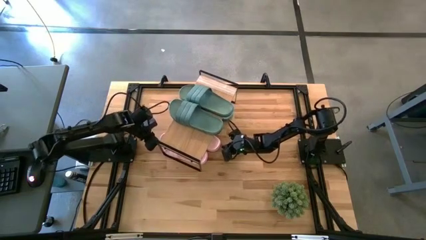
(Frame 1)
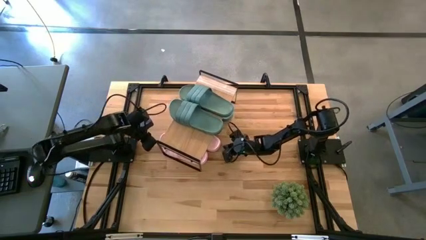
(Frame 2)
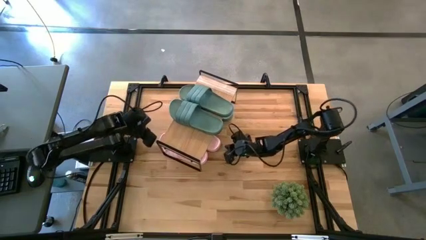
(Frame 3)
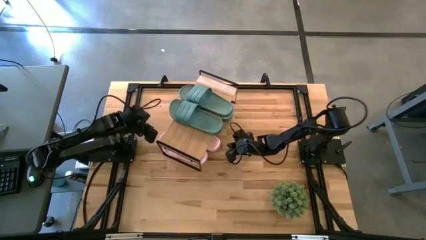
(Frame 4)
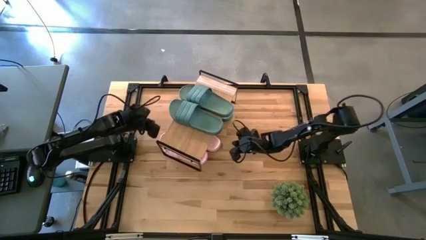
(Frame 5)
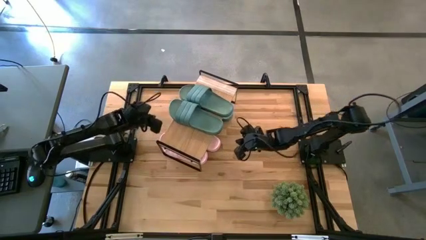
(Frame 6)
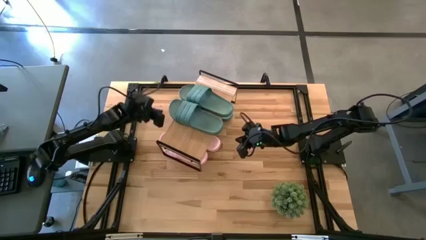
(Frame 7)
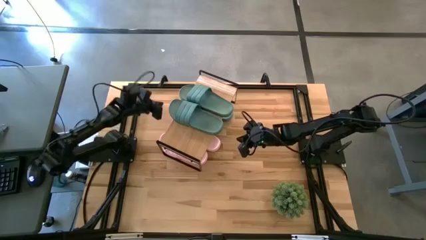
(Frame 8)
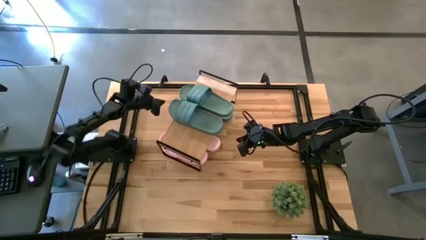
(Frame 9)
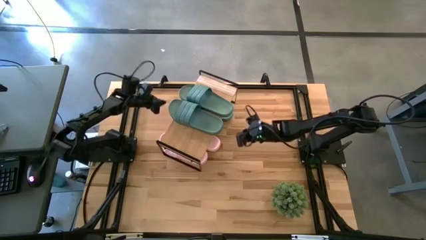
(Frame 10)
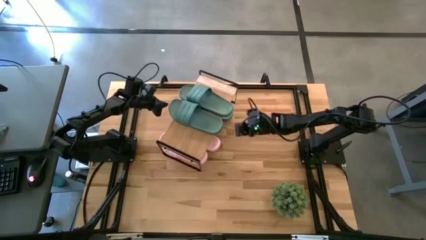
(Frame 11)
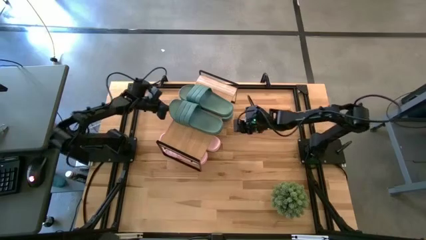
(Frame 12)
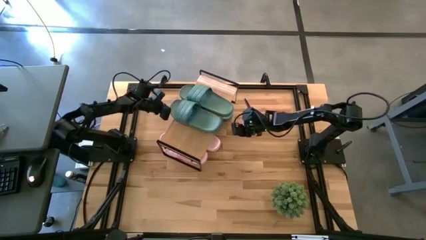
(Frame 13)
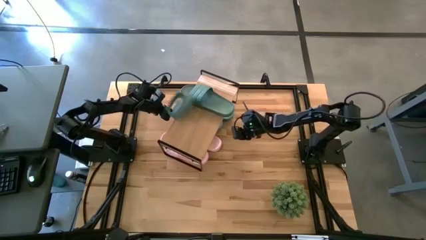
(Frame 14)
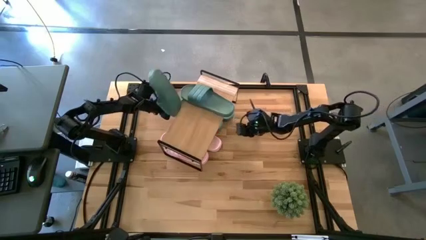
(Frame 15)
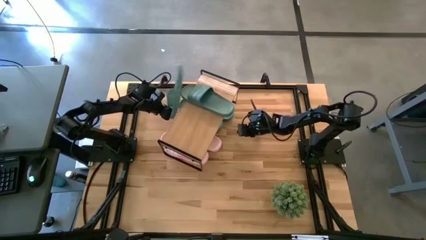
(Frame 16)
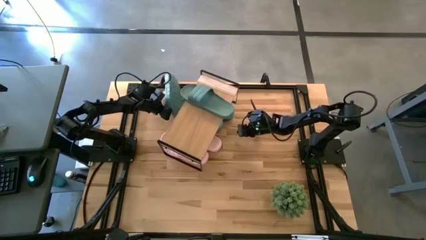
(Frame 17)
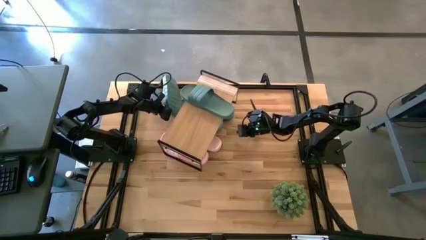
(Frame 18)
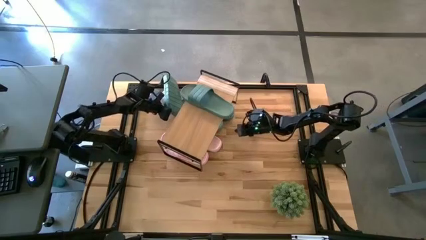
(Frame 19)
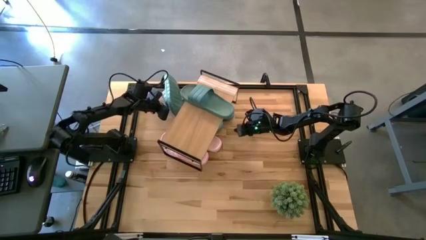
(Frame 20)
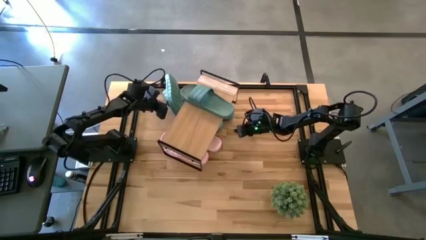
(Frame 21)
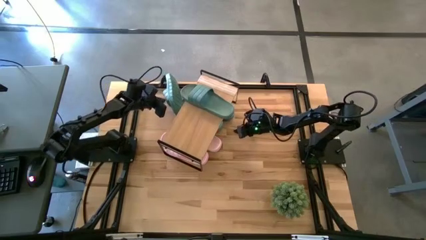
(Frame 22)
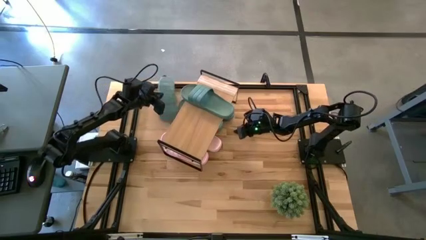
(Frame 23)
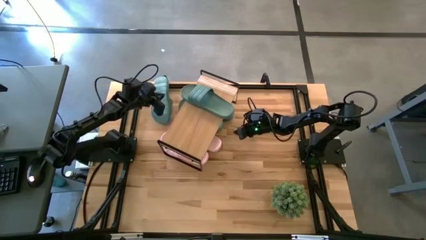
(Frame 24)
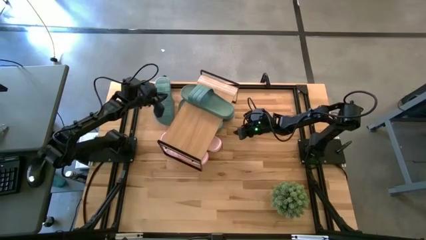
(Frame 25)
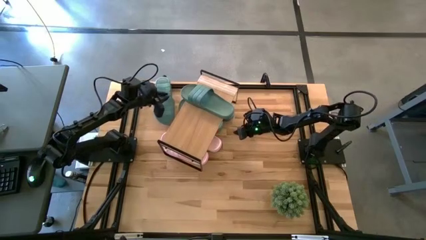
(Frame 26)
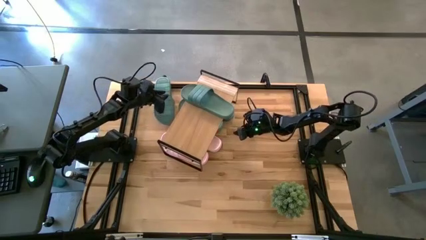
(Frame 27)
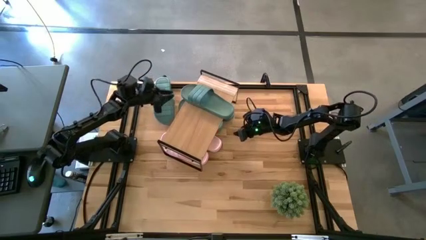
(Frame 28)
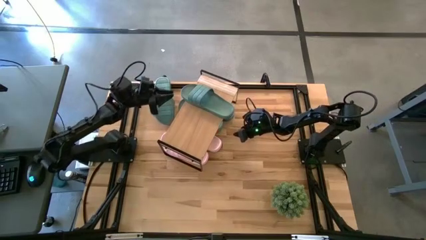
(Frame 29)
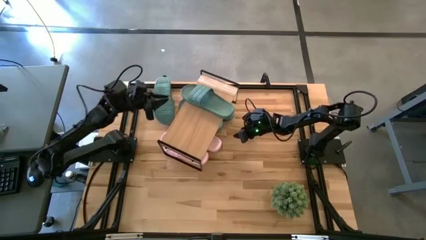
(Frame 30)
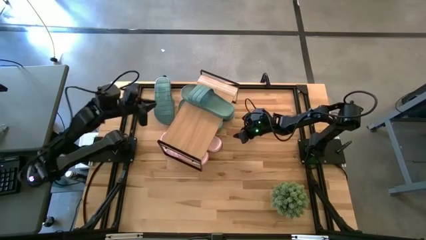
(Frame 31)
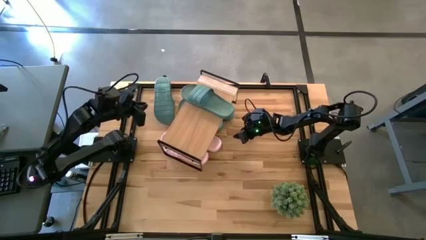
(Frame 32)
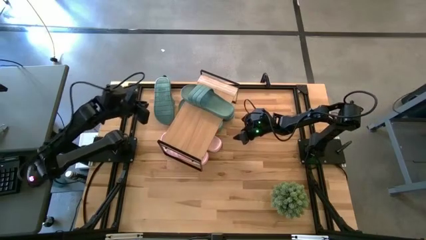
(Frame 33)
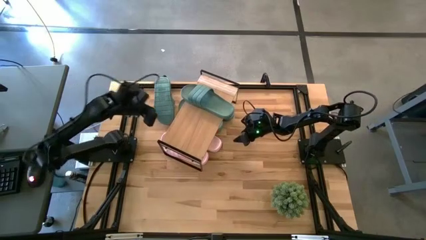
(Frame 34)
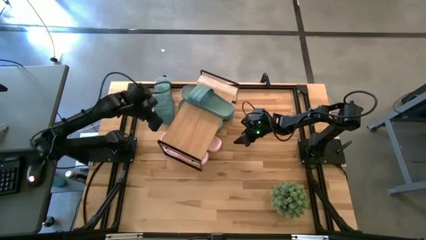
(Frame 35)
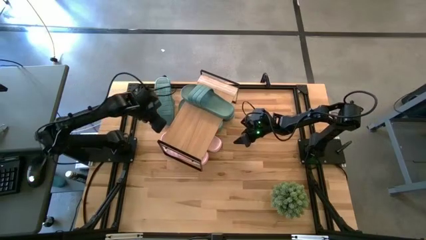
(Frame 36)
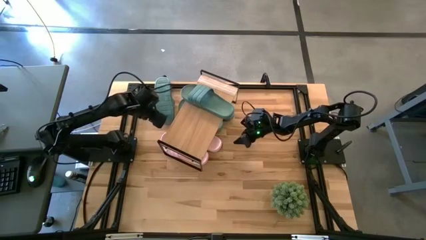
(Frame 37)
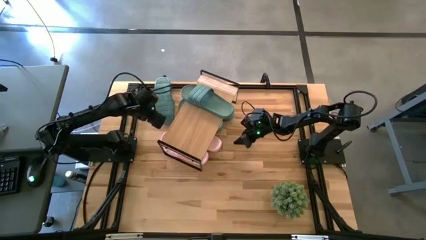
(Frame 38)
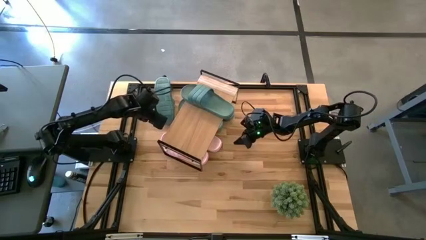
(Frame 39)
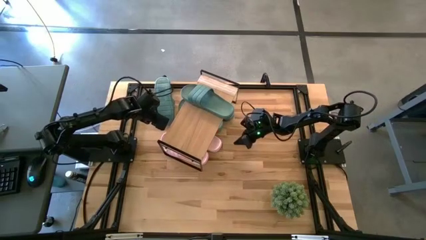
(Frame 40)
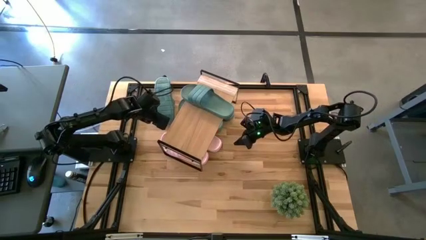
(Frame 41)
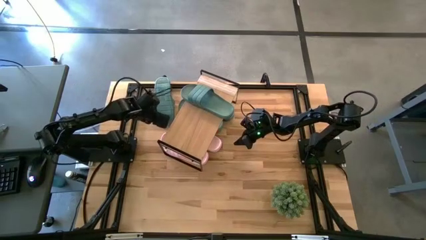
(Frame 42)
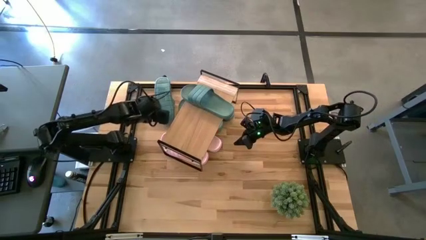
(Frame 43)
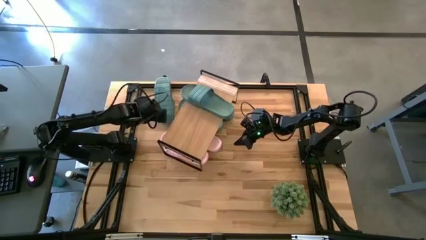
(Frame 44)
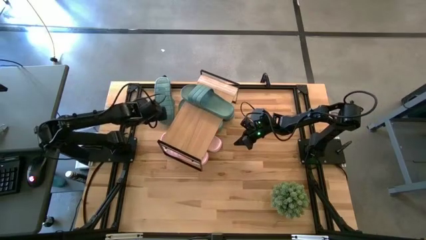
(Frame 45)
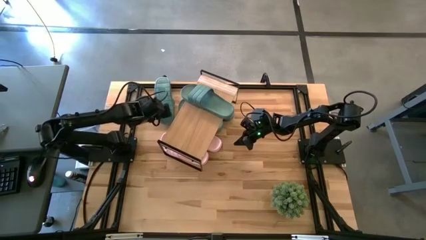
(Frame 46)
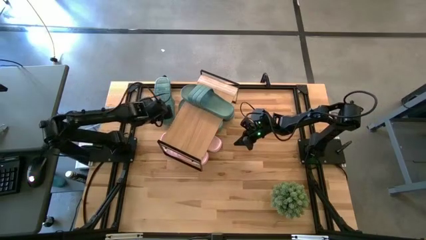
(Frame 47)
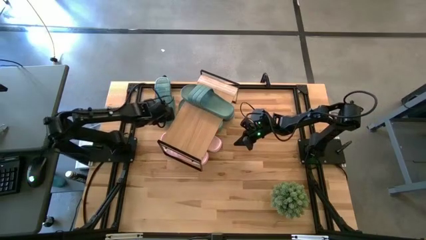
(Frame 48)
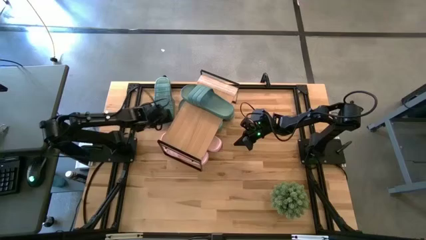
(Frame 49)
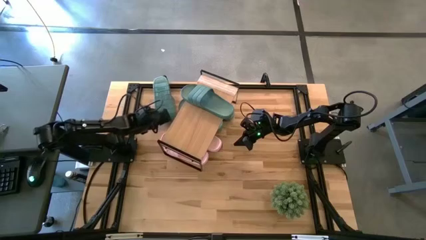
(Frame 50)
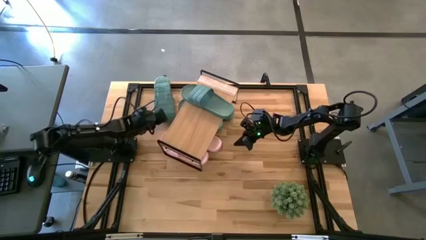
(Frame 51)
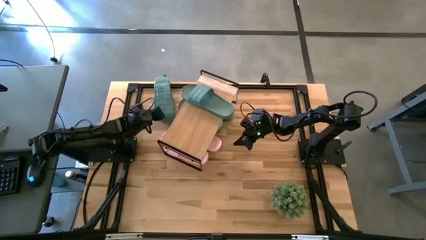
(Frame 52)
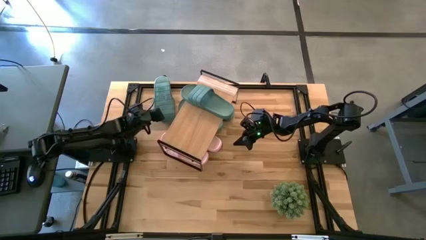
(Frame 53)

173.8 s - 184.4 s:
Task: Pick and place slides into the shelf
Put the green slide on the shelf

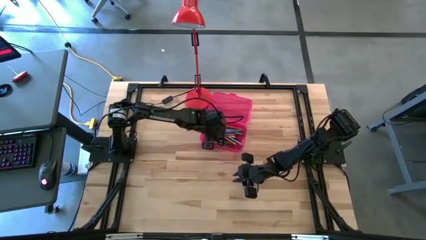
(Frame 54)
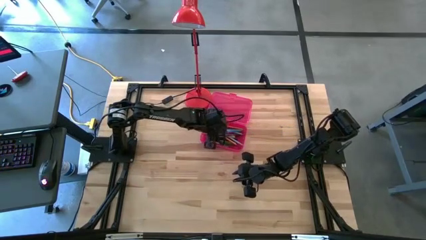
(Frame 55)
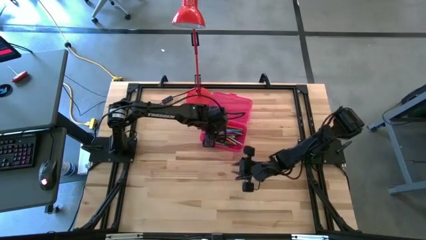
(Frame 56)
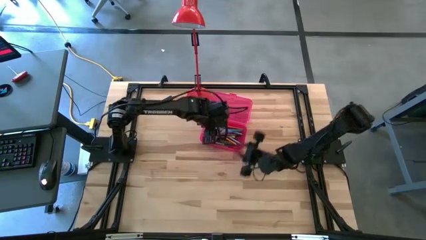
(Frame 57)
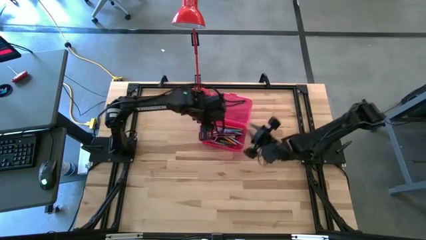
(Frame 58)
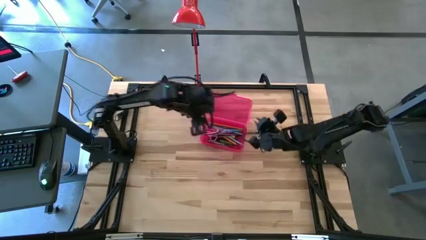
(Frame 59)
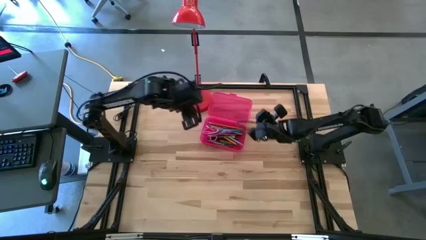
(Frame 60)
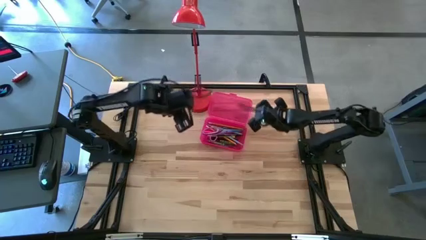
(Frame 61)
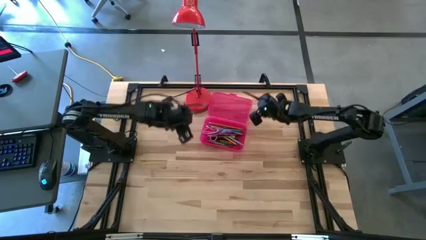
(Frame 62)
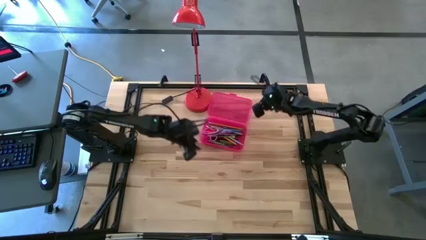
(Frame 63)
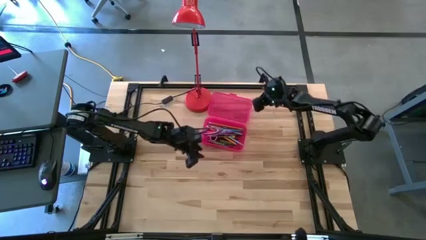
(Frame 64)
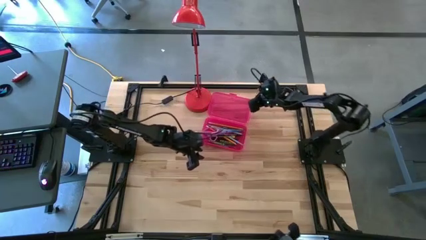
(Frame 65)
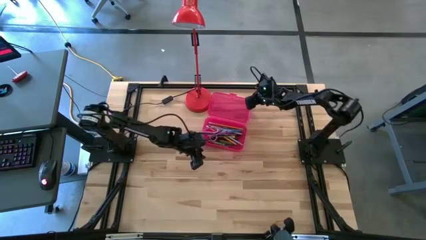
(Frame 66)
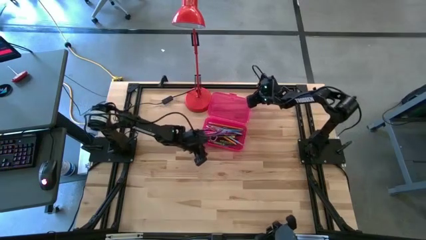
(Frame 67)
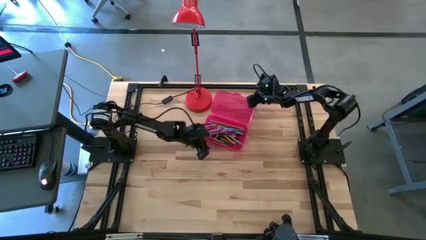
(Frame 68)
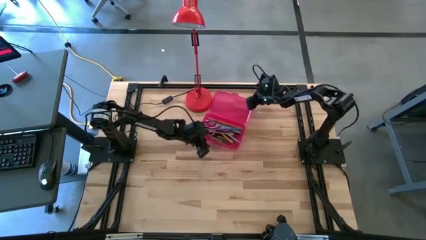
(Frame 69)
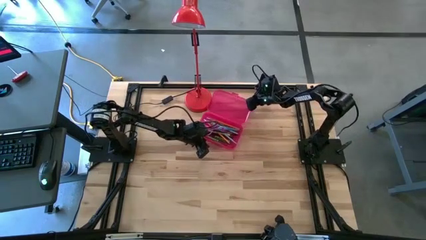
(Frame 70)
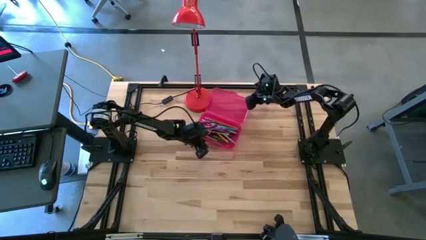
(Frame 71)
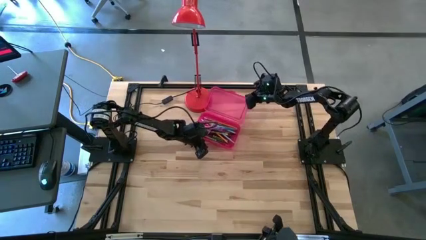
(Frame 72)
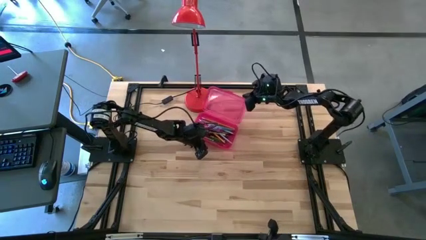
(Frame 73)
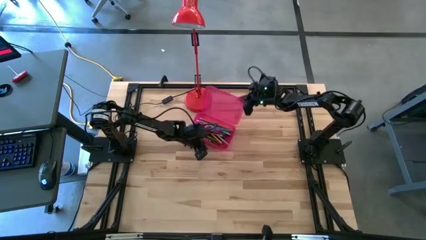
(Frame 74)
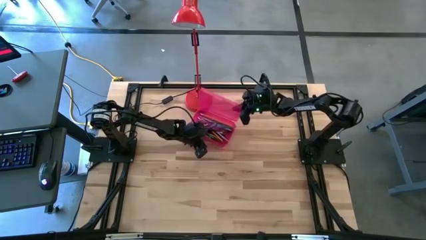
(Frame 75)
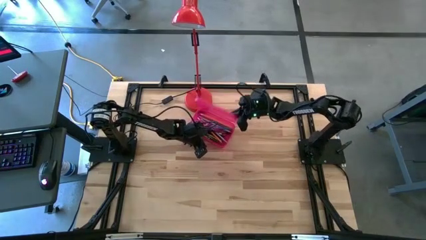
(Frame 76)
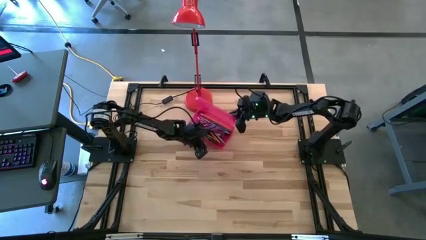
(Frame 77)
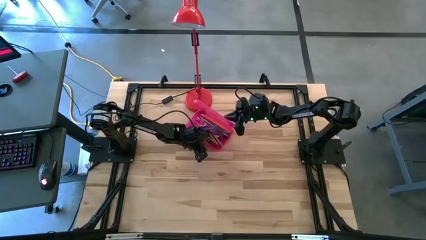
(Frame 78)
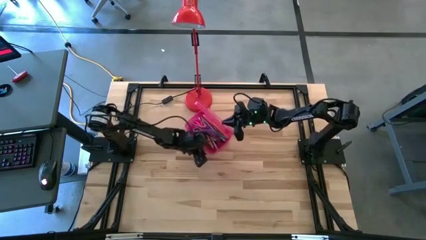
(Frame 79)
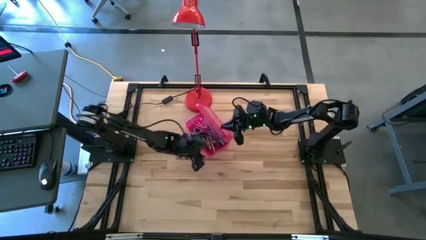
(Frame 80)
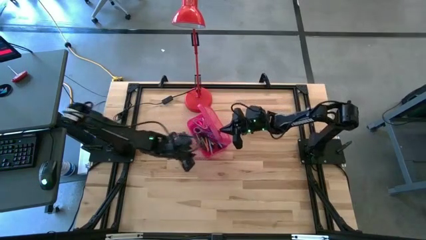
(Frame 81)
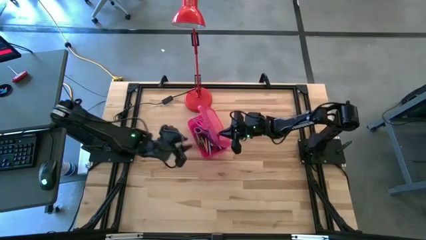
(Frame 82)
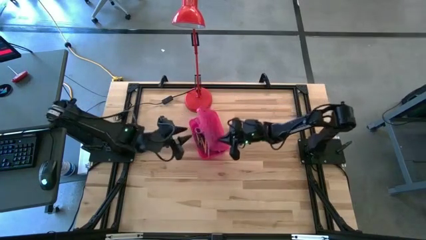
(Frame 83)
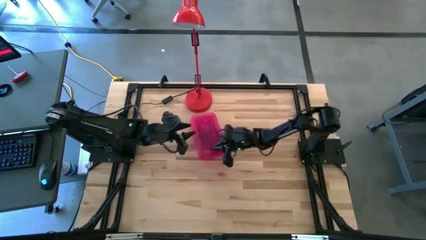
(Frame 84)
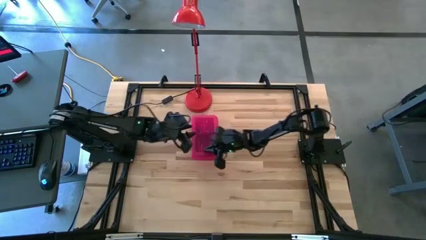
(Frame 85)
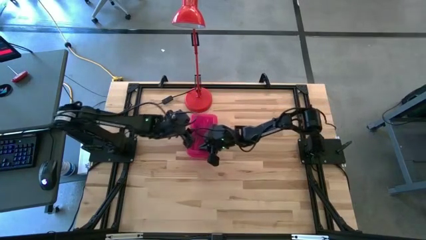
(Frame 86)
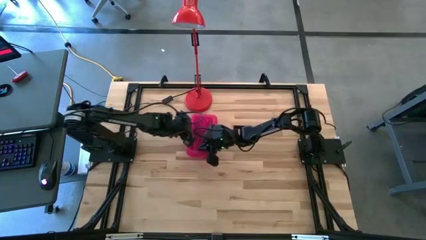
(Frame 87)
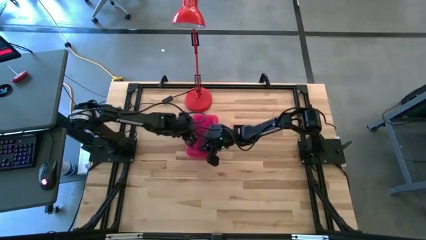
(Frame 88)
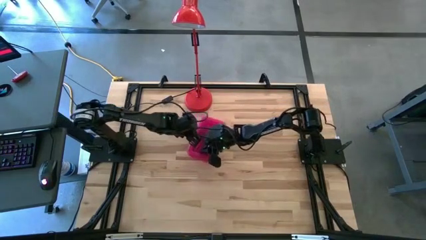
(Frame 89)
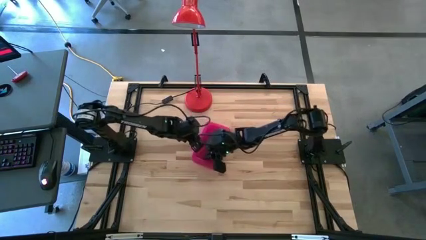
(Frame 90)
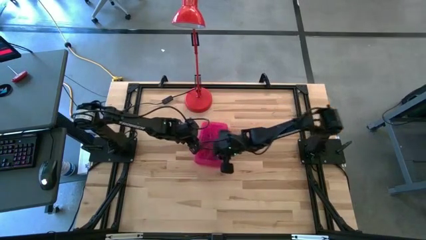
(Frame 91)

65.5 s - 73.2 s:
Task: Pick & place school supplies into a supply box
Close the pink supply box
